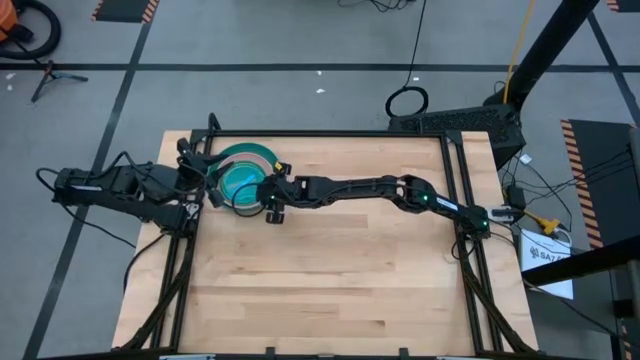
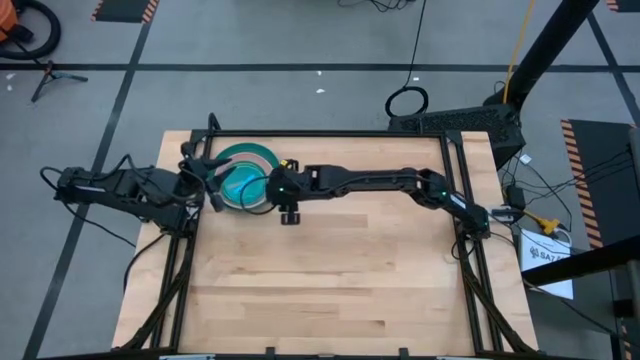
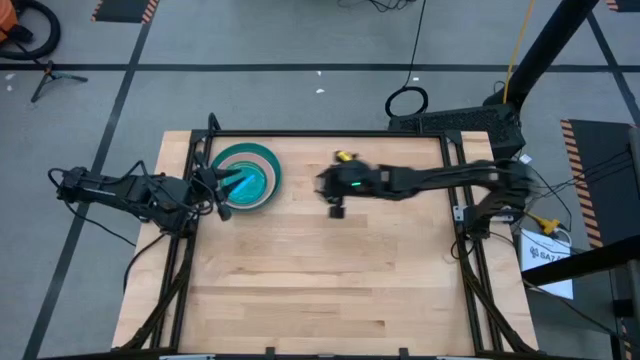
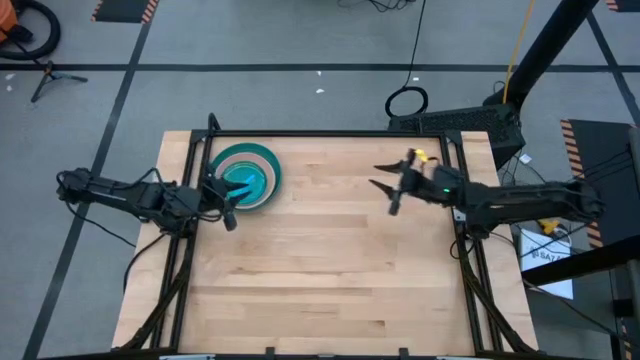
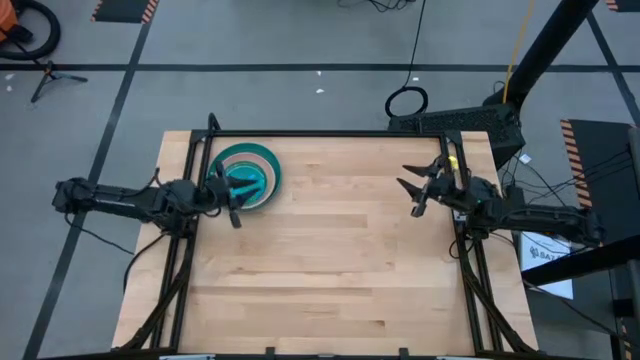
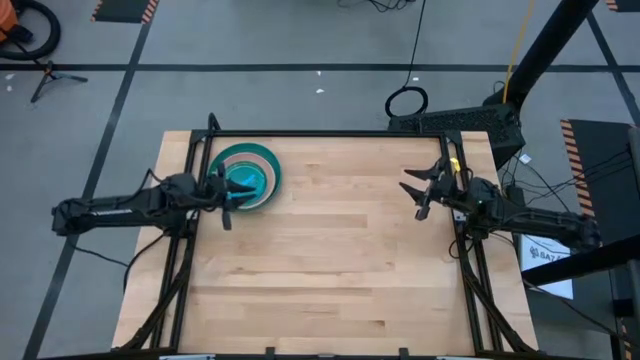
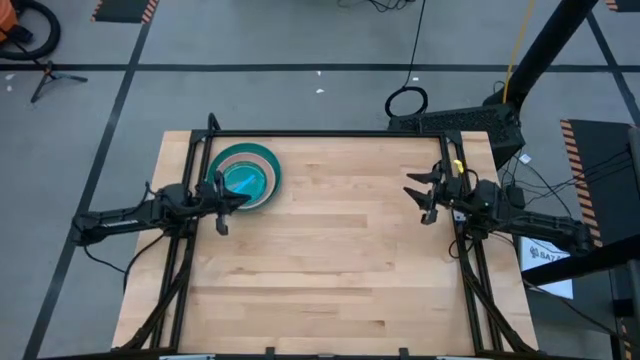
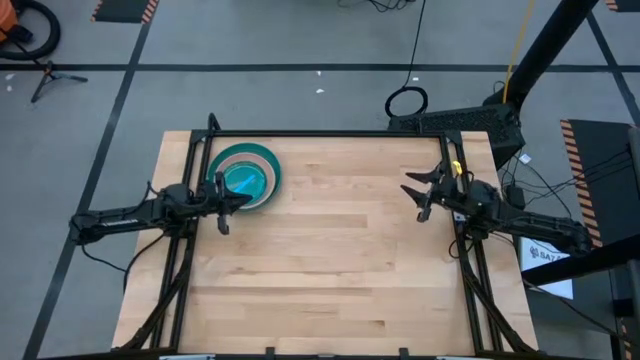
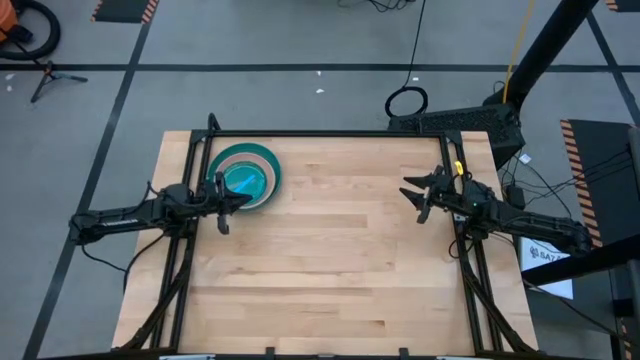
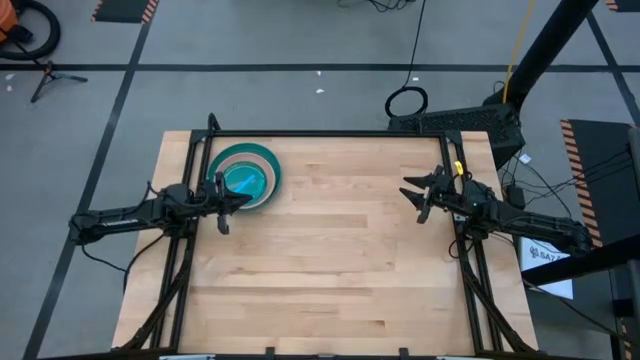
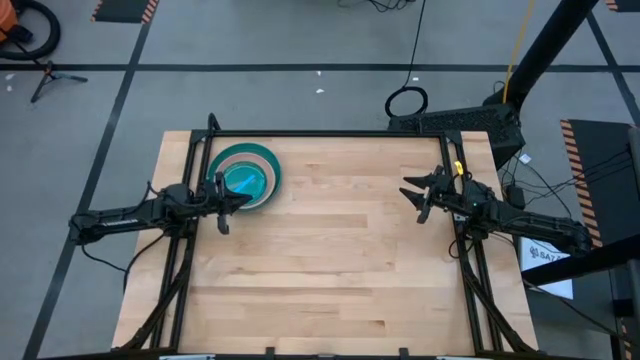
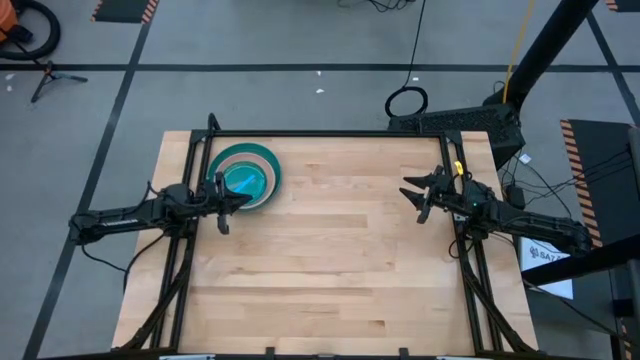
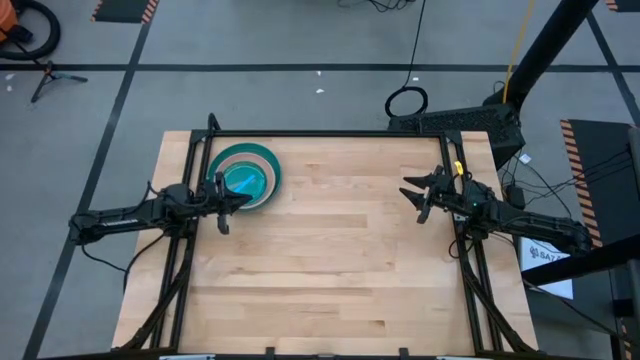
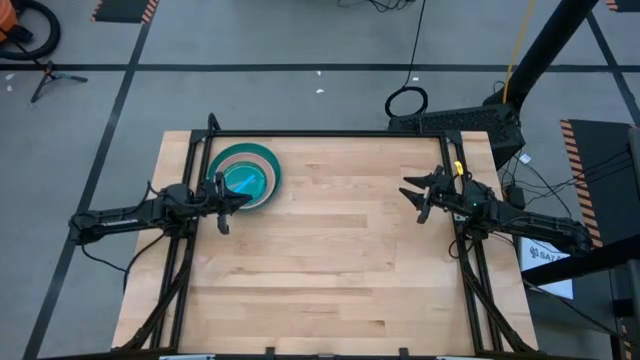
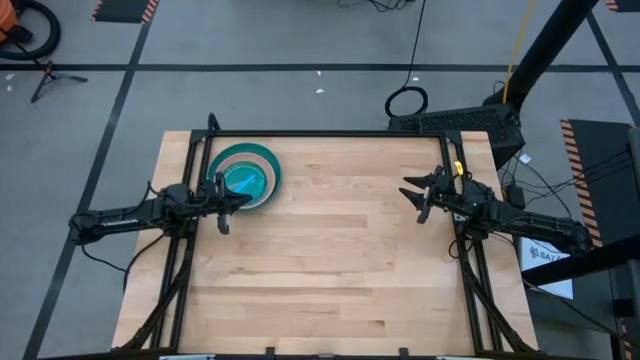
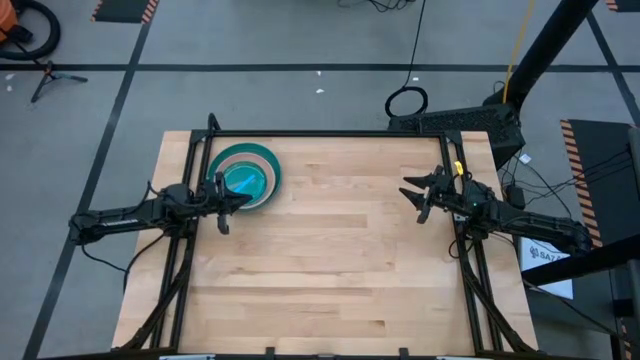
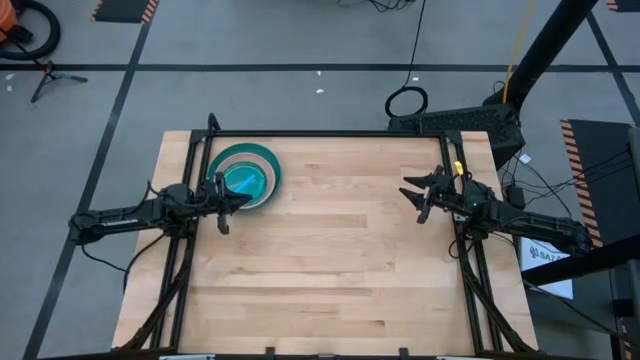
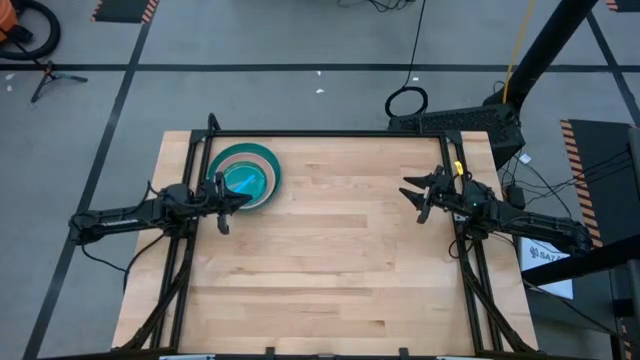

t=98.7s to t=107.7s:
Task: Stack plastic plates
Return to Home Position

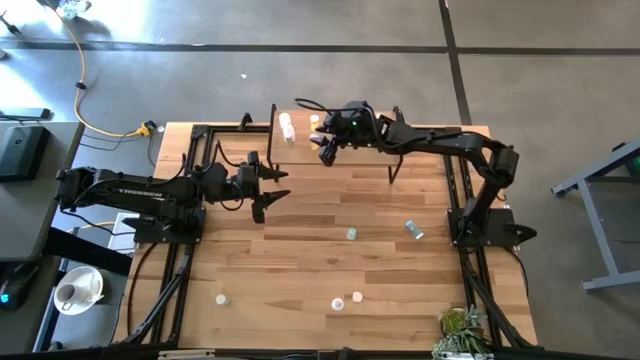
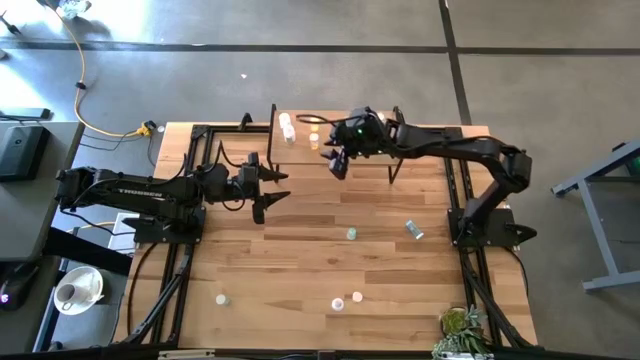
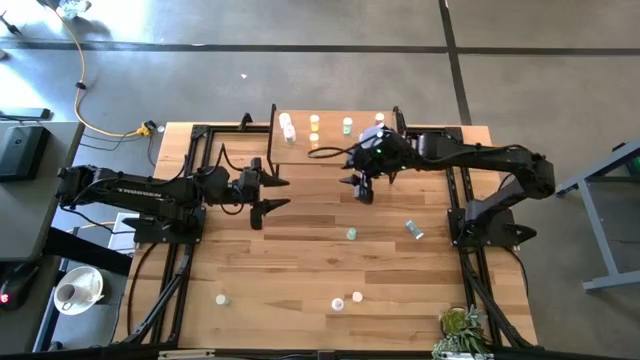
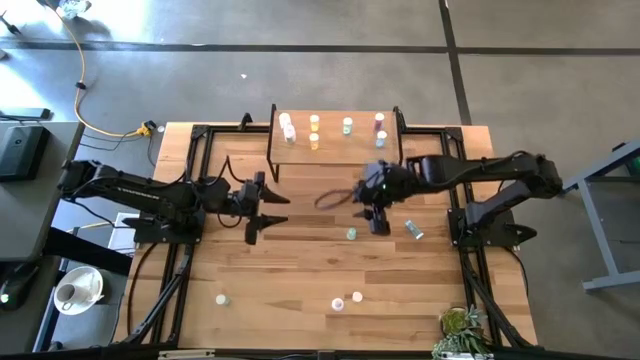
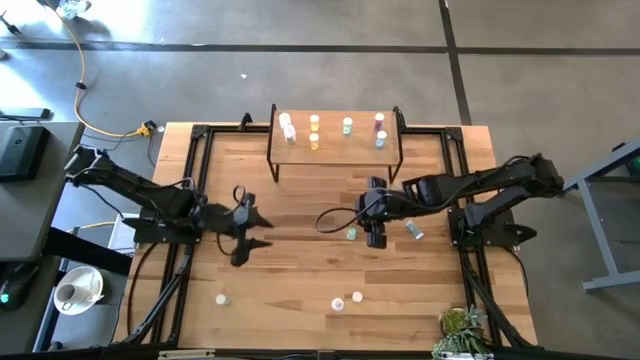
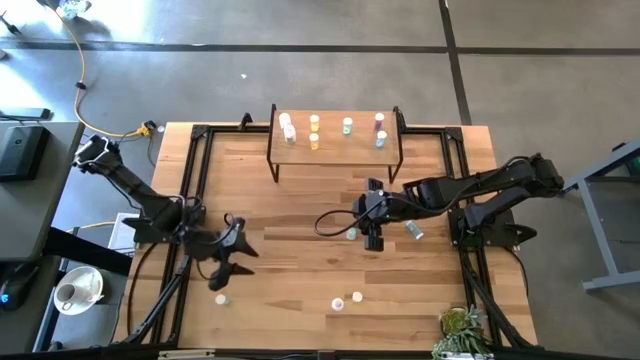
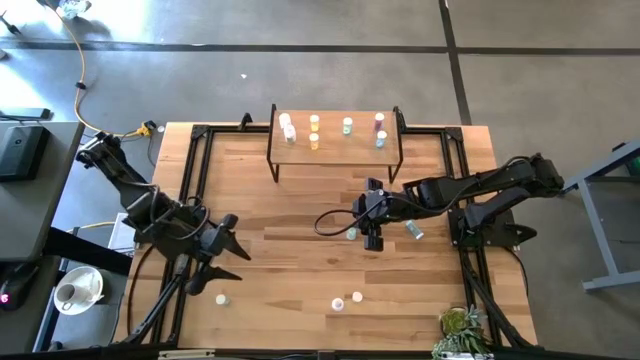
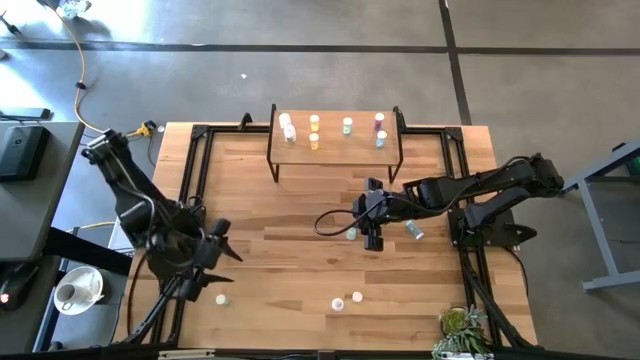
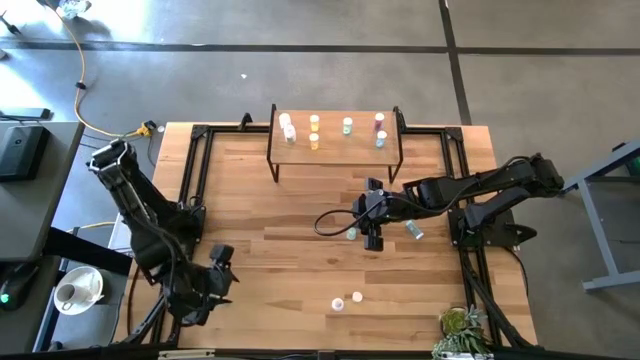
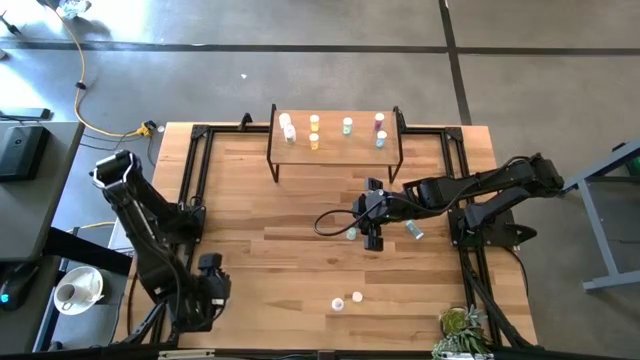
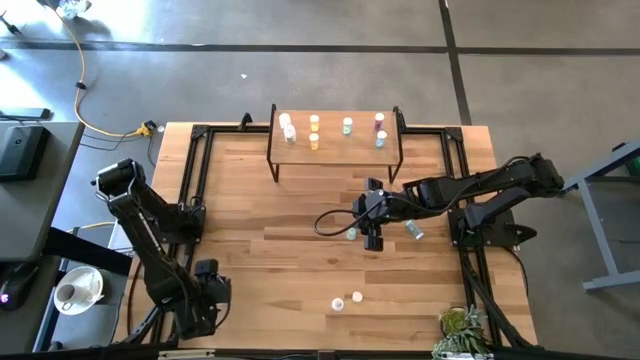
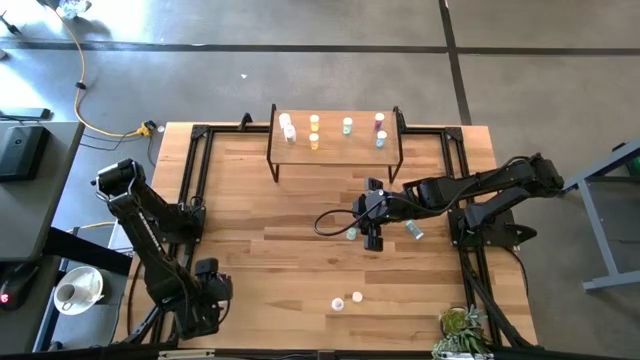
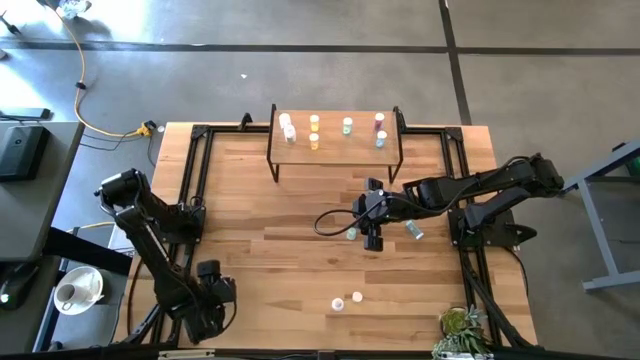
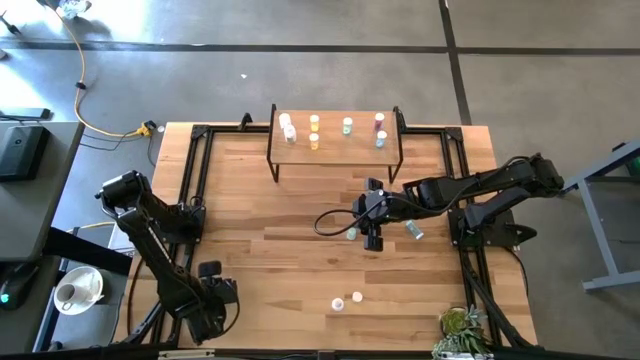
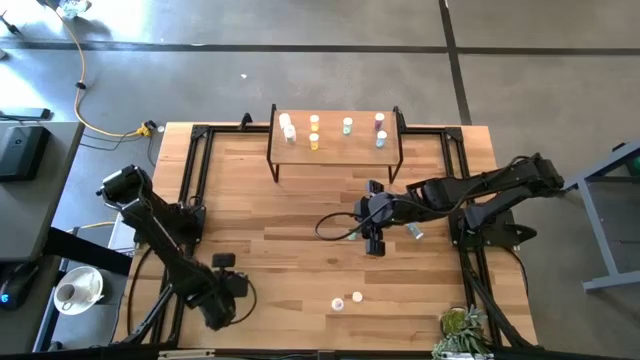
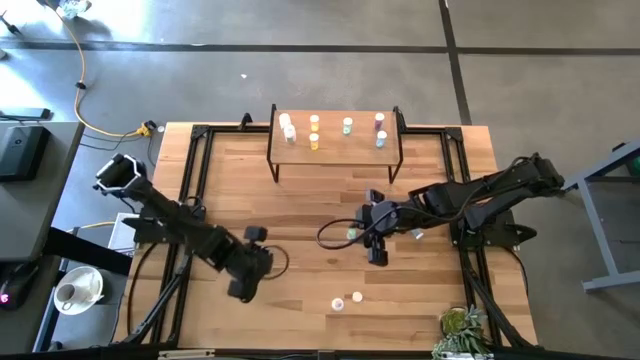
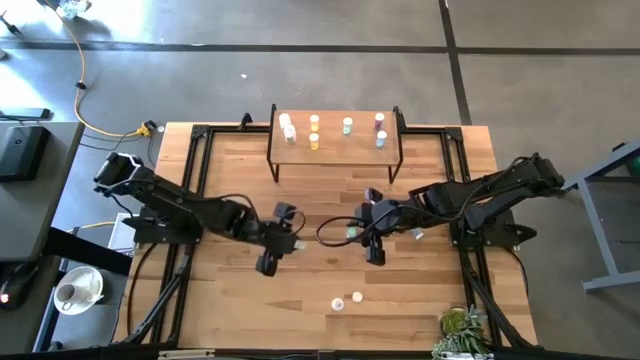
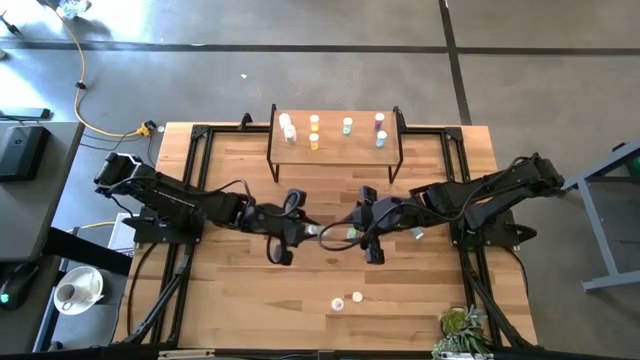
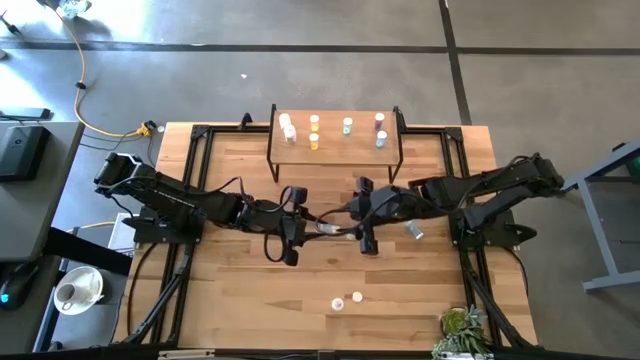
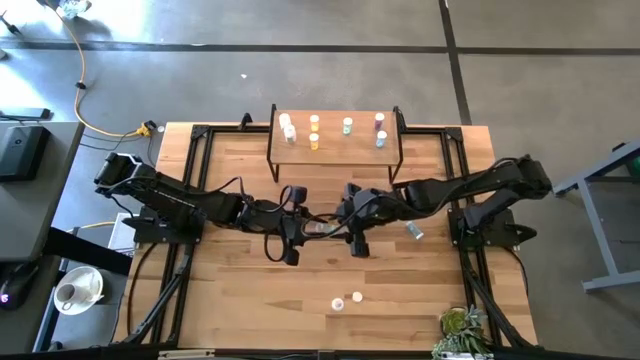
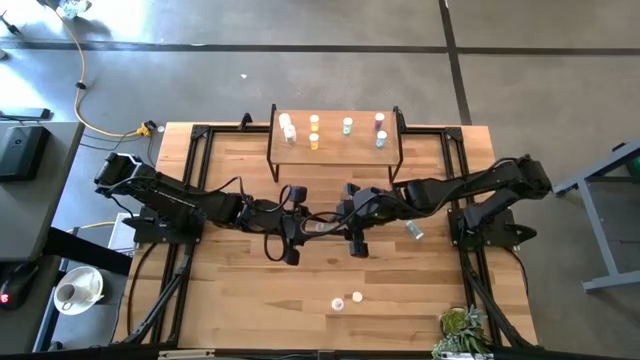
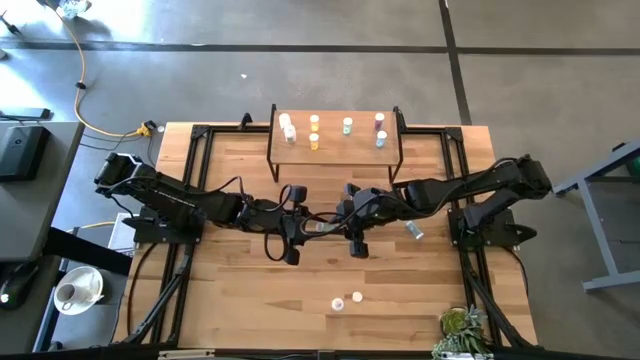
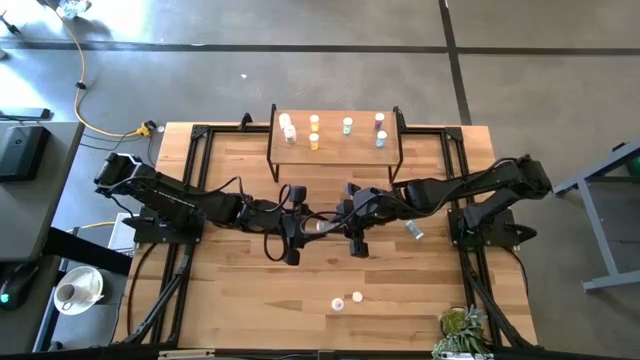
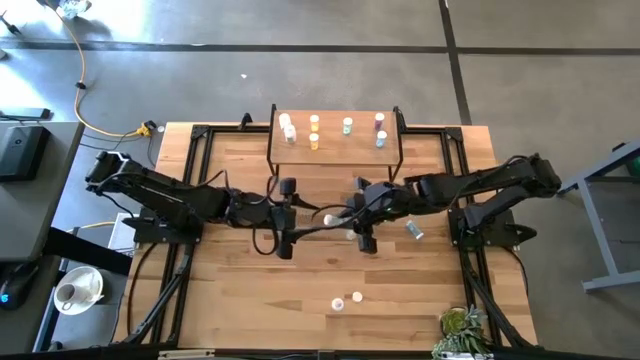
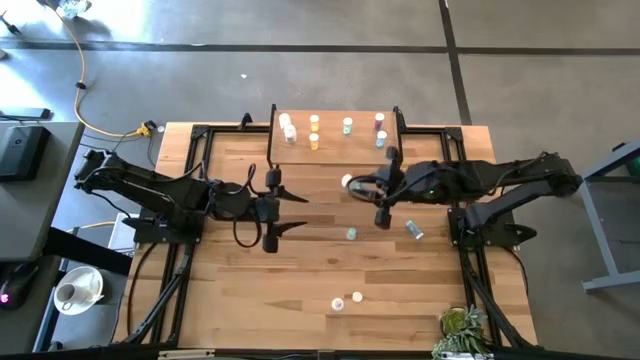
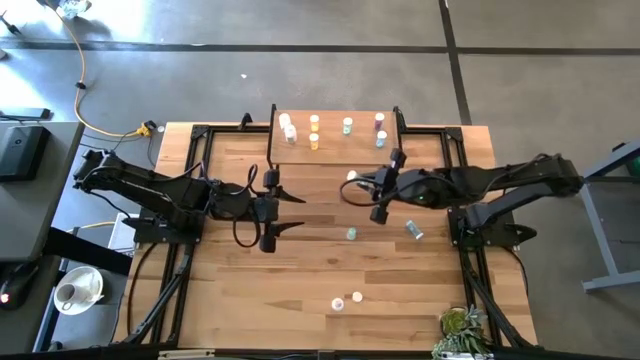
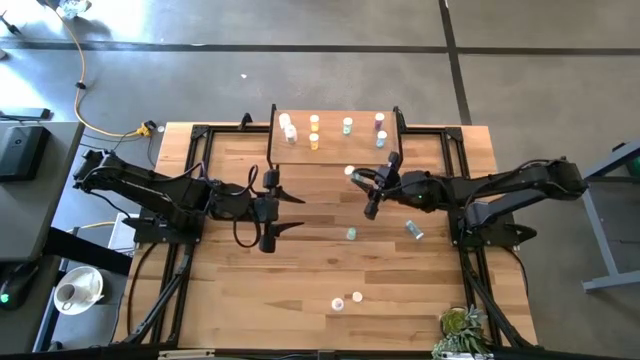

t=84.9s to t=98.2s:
Task: Pick and place medicine bottles onto shelf by color
Put the bottom green pill bottle on the shelf aligned with the other green pill bottle
